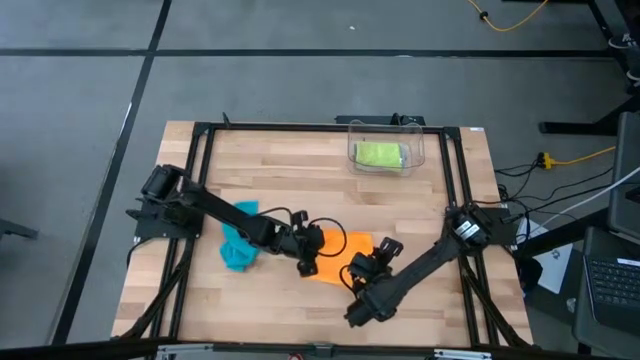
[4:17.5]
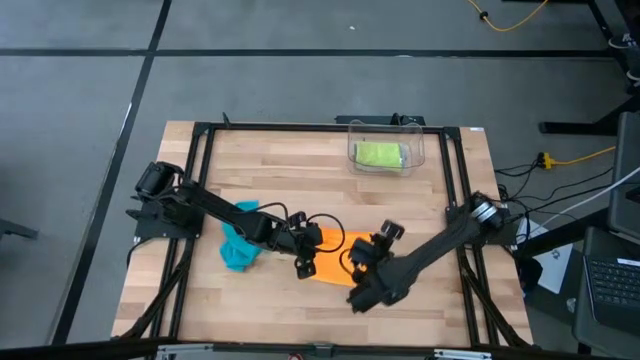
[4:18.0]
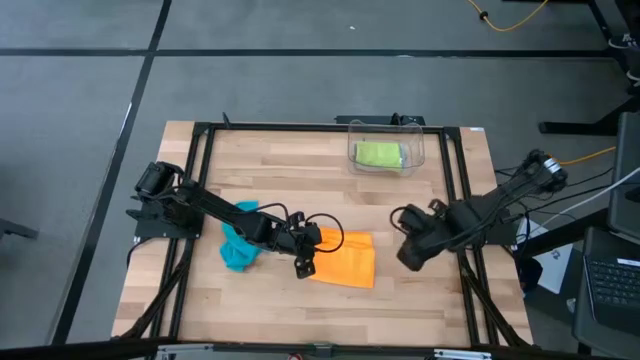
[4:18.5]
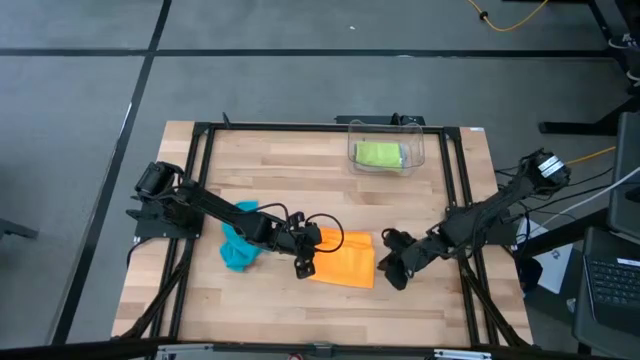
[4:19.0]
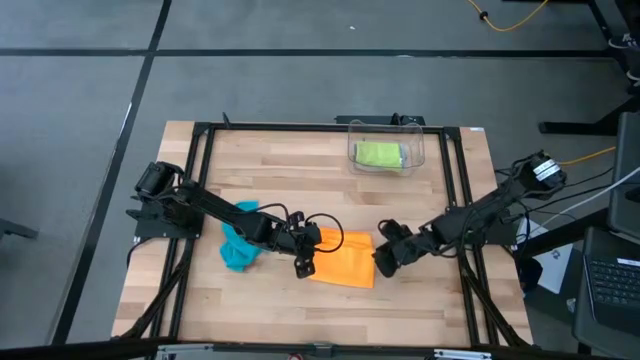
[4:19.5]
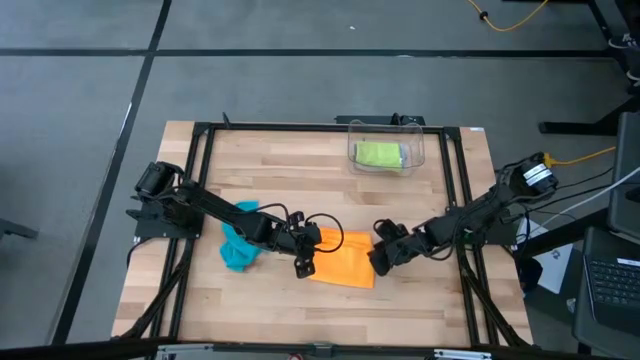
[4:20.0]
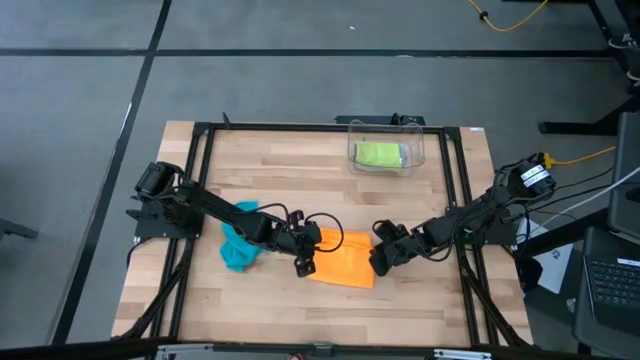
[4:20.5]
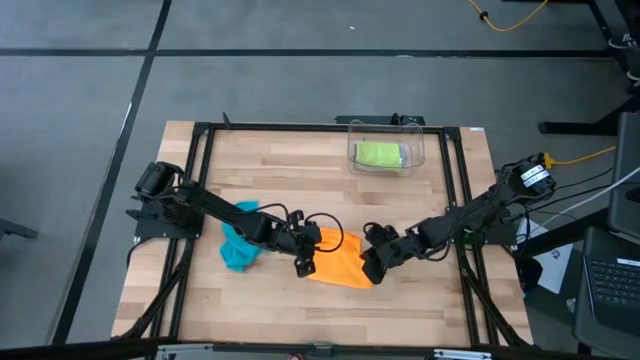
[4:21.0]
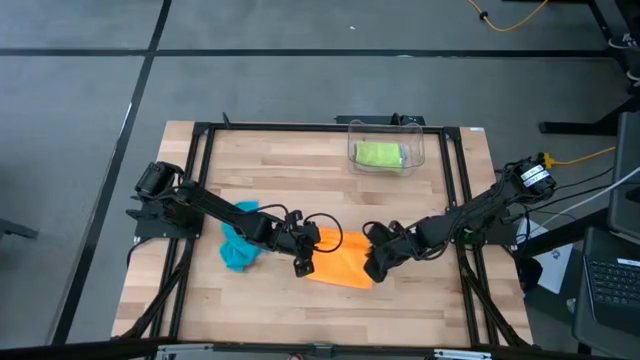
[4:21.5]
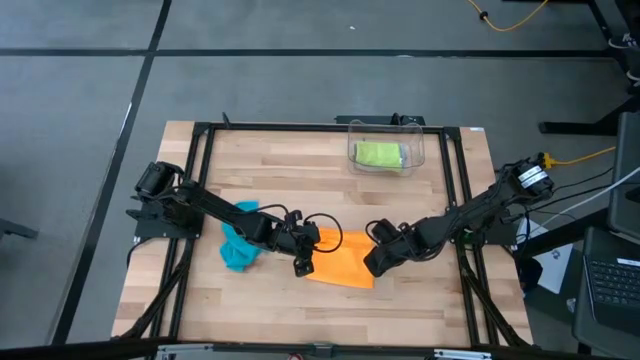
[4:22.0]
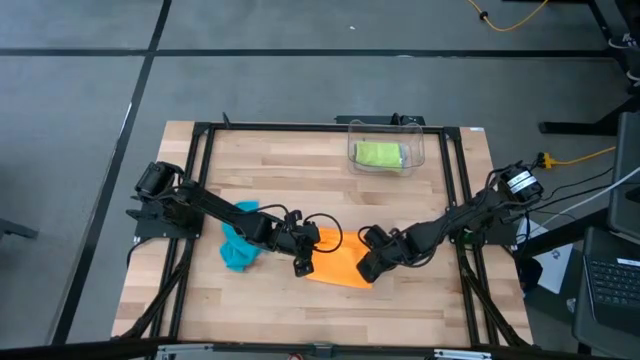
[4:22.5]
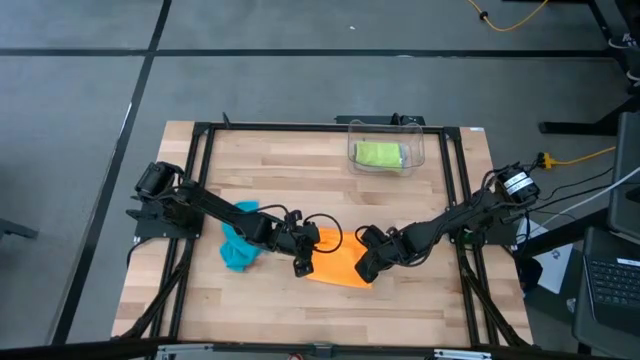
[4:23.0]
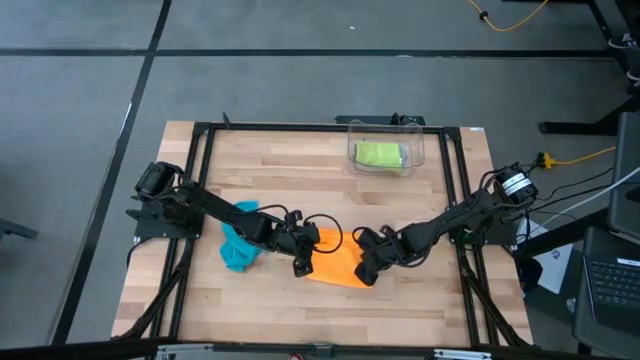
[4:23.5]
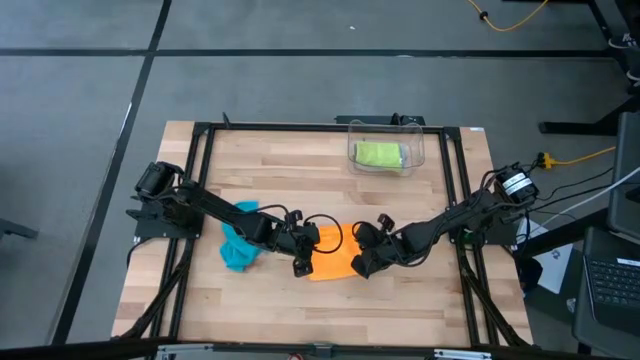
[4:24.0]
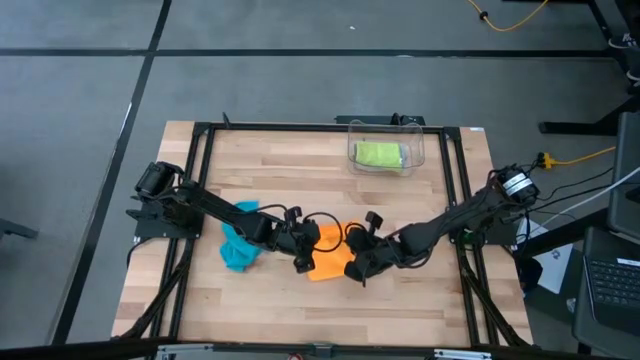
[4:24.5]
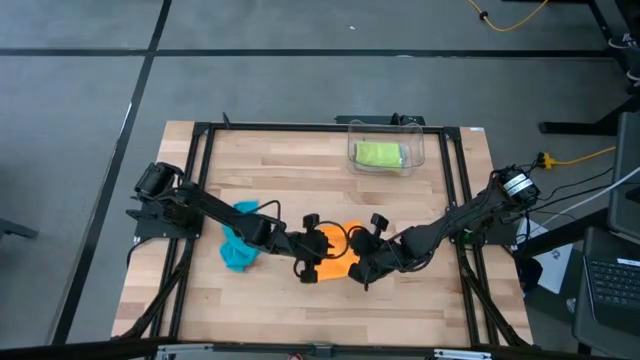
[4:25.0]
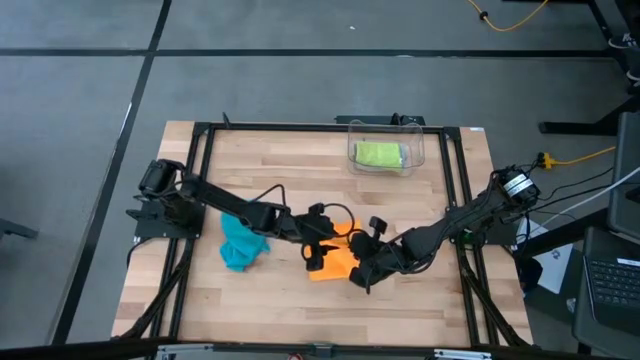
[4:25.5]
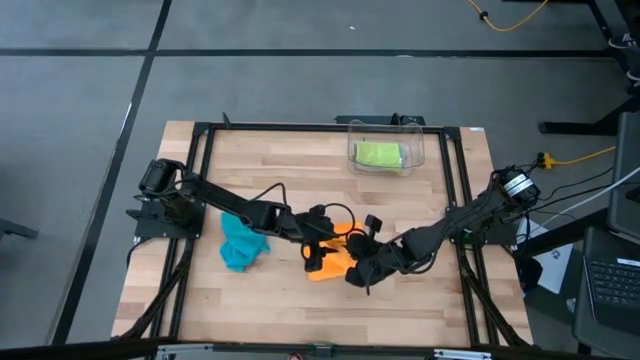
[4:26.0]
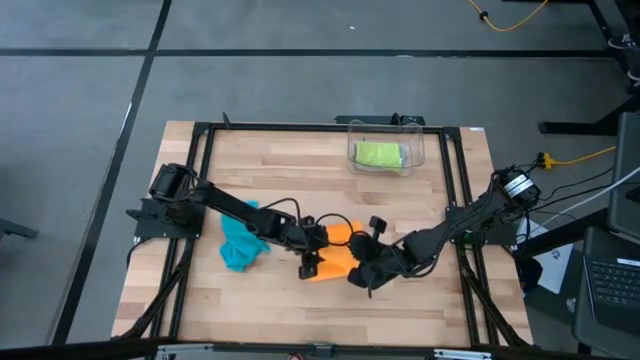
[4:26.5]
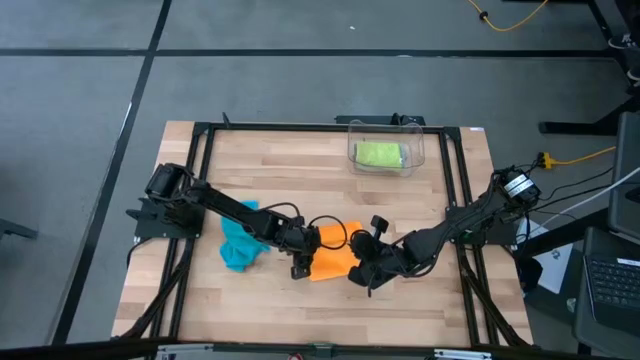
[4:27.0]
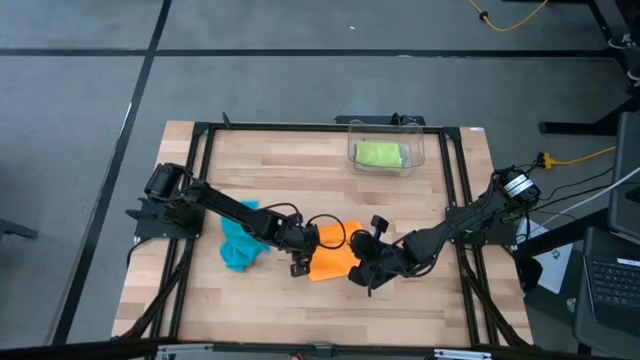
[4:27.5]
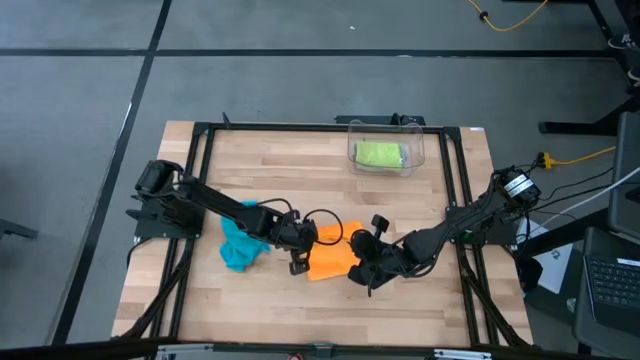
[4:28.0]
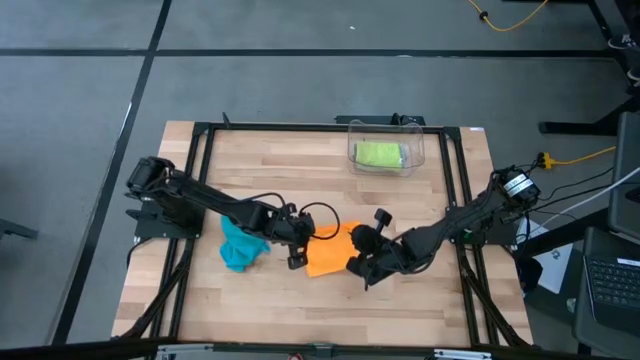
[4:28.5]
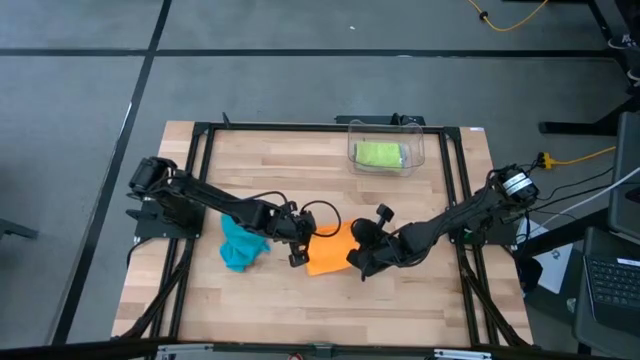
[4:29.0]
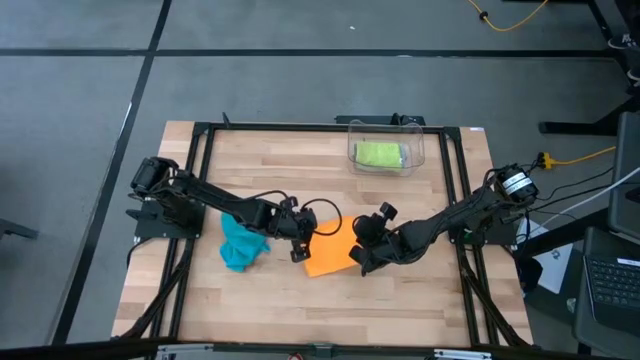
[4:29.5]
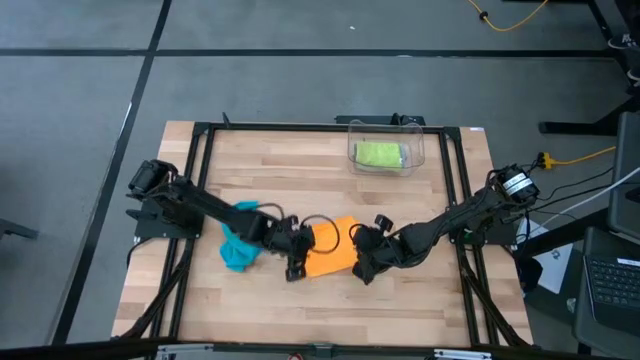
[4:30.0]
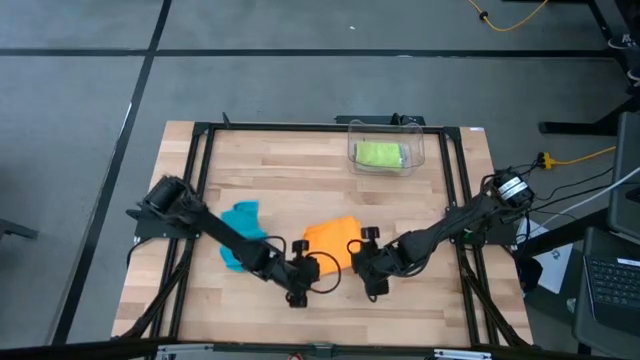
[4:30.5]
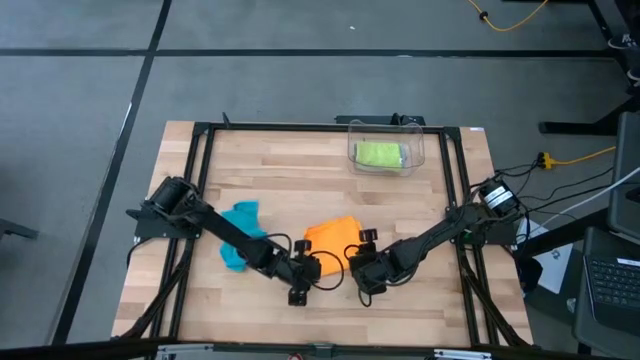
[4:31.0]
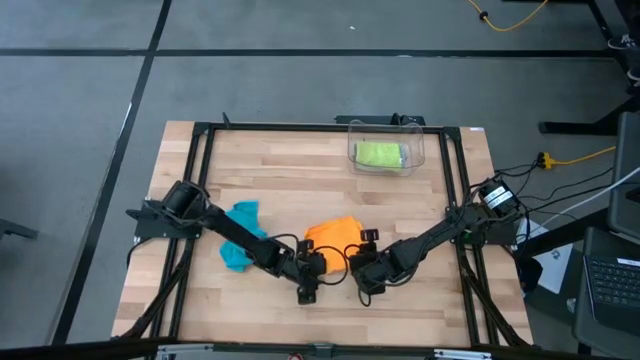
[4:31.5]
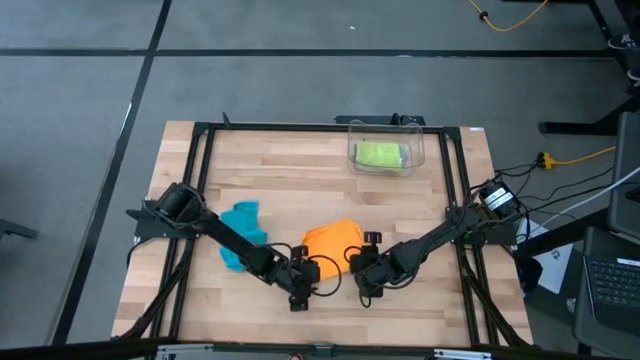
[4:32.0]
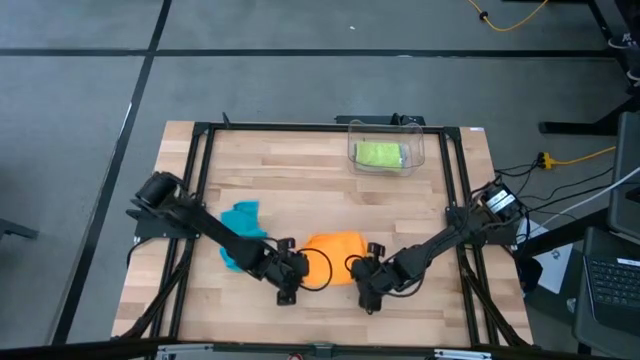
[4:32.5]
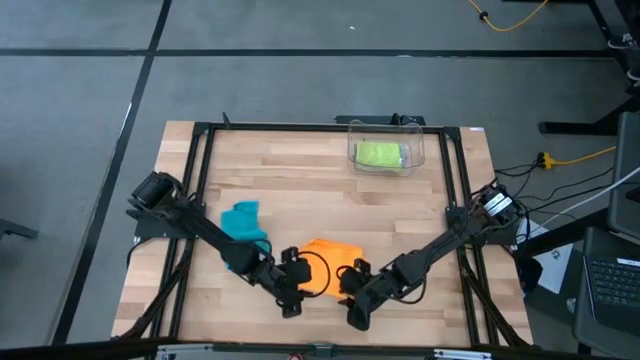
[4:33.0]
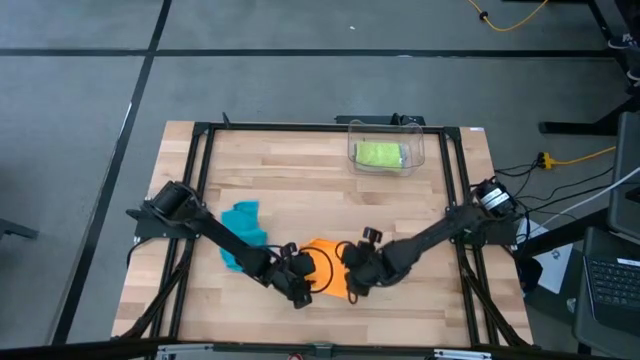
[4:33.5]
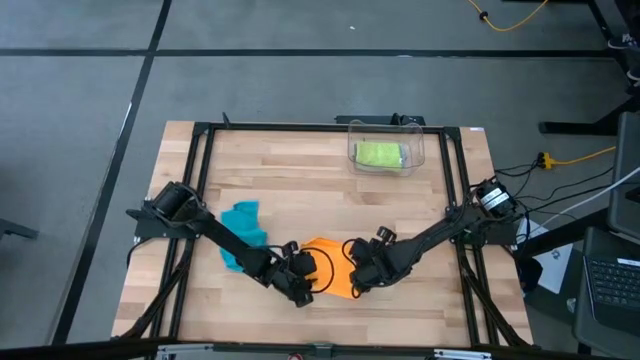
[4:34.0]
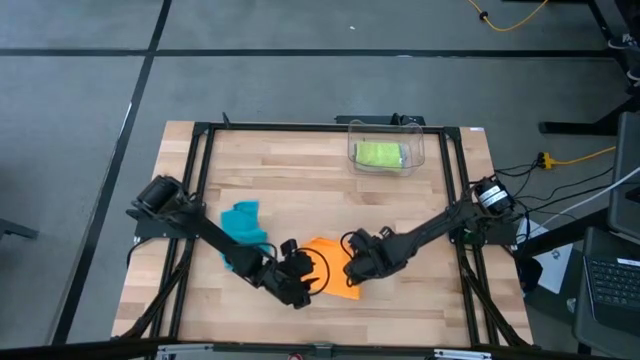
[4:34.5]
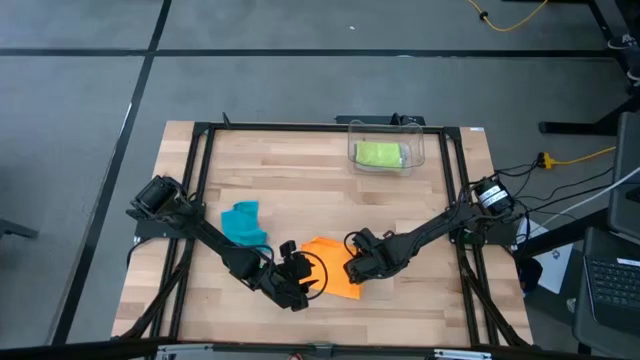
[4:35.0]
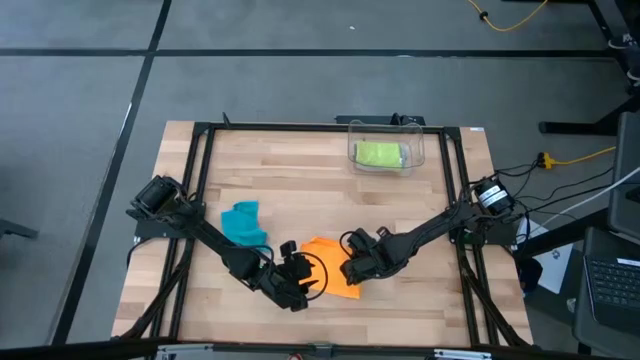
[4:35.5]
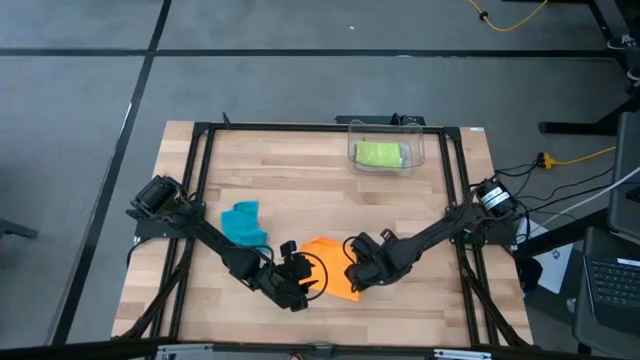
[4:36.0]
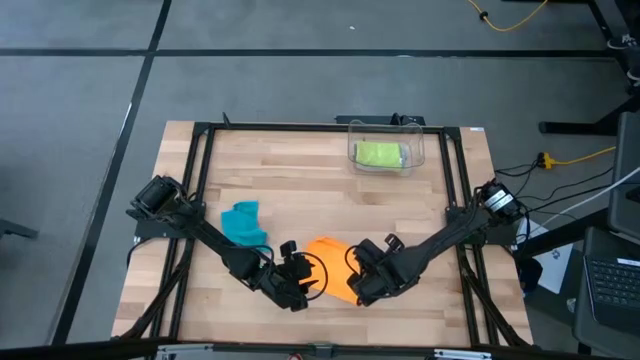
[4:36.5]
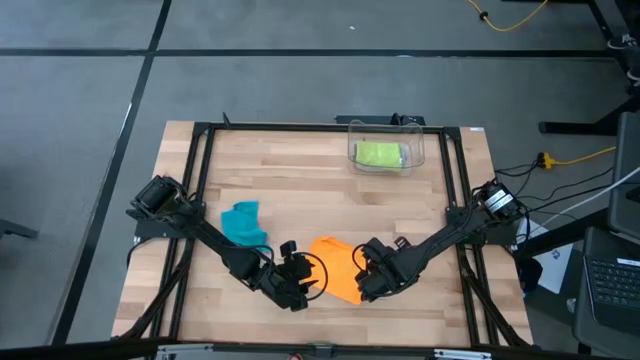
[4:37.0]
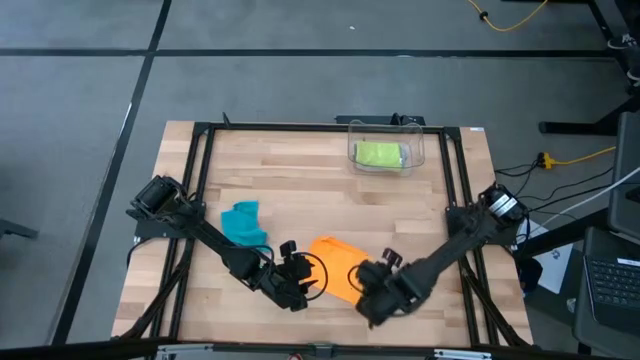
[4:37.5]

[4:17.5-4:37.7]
Task: Fold microfiber towels
Fold the orange microfiber

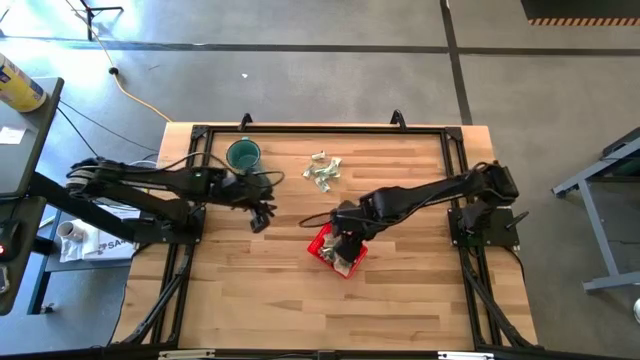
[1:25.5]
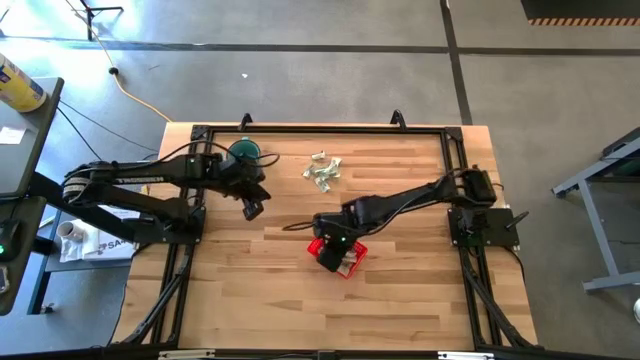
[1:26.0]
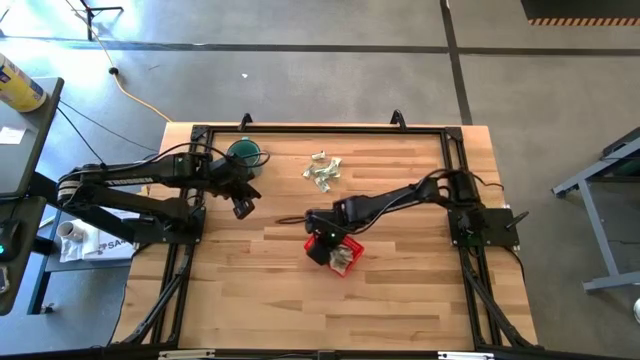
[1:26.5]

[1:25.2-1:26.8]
Task: Pick and place Stevia / Truvia into bins
Adjust the stevia packets into the bin
